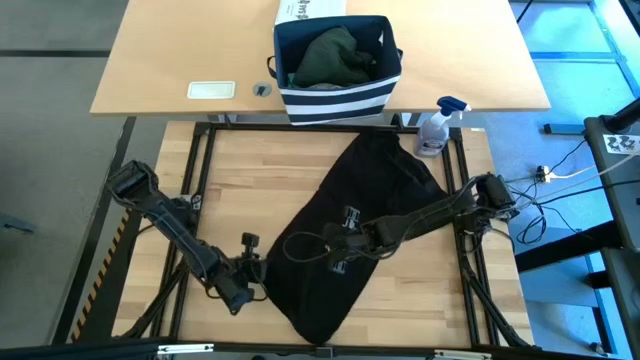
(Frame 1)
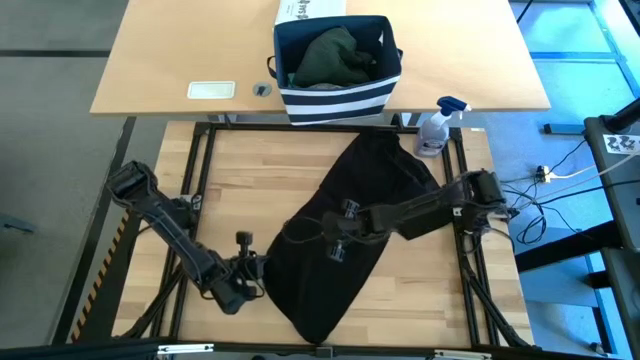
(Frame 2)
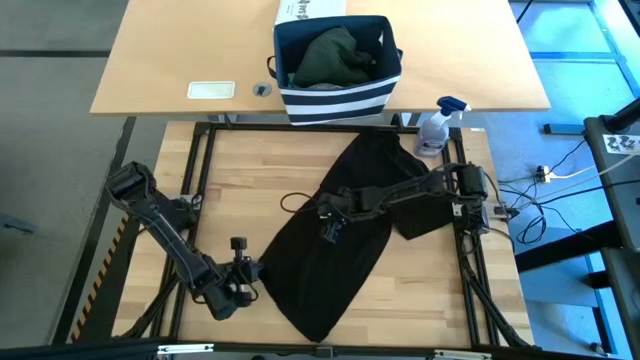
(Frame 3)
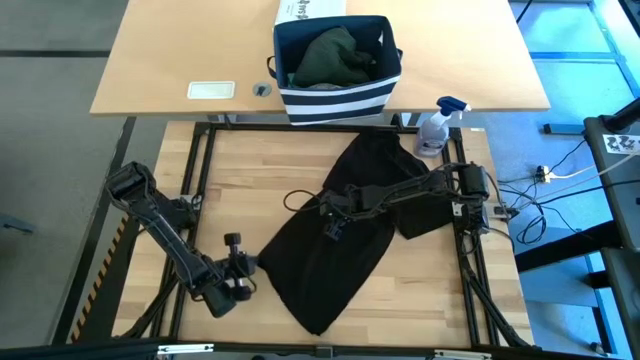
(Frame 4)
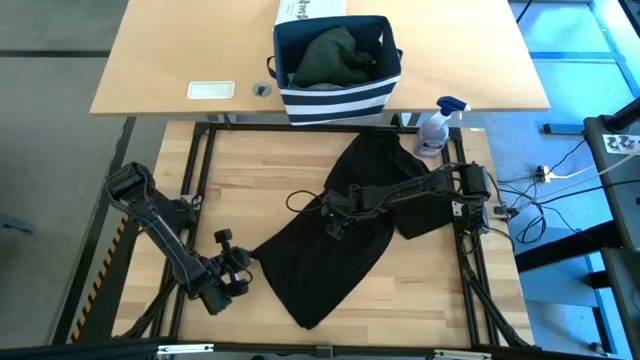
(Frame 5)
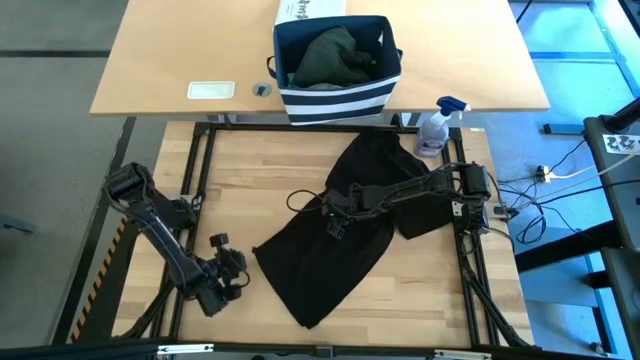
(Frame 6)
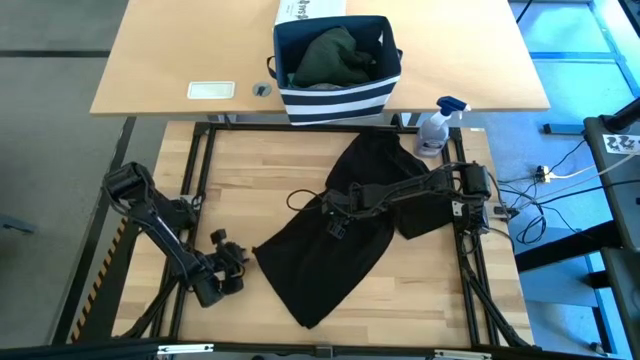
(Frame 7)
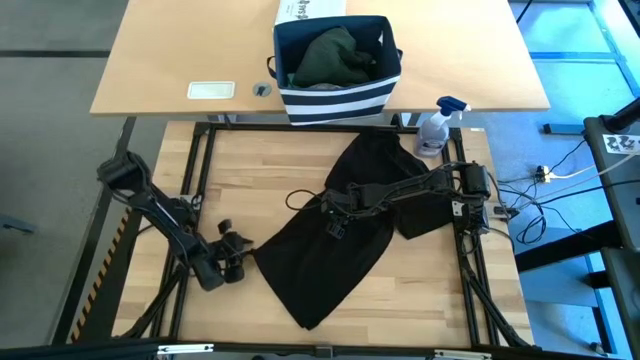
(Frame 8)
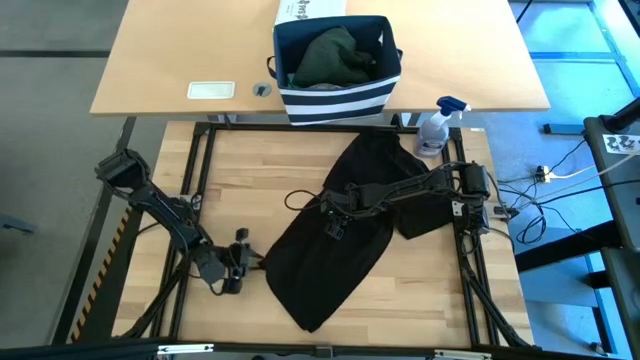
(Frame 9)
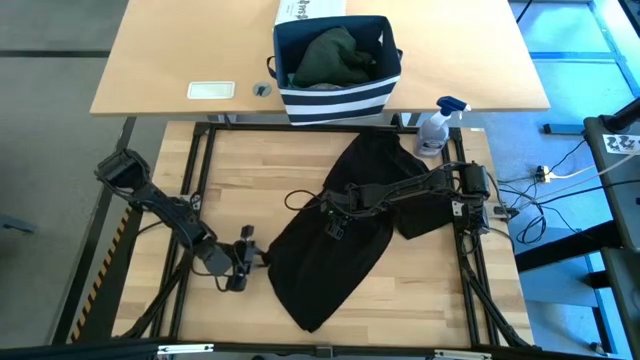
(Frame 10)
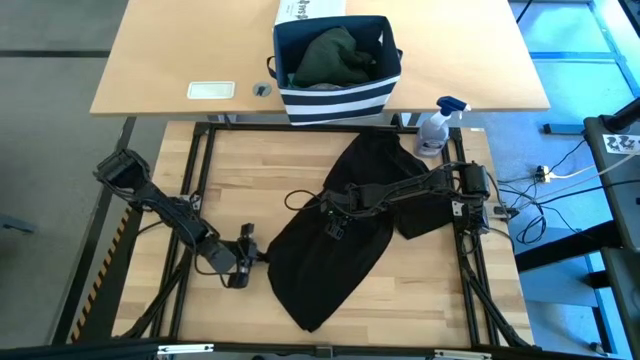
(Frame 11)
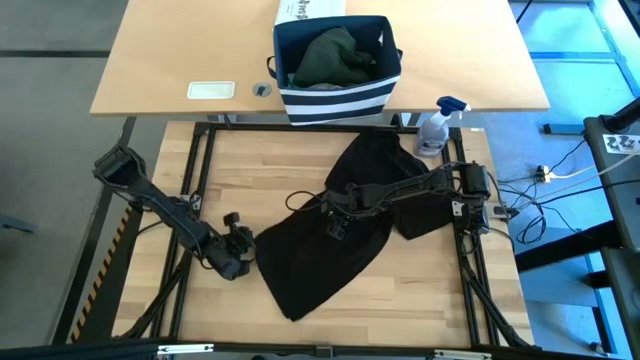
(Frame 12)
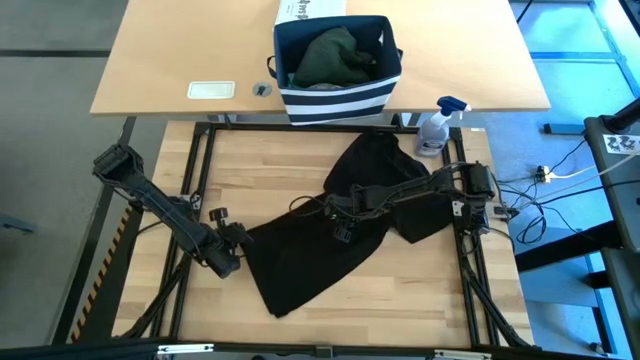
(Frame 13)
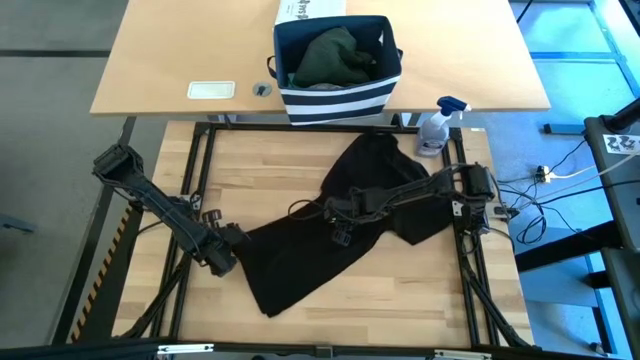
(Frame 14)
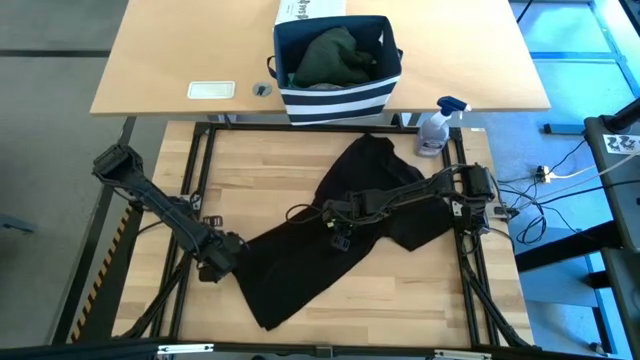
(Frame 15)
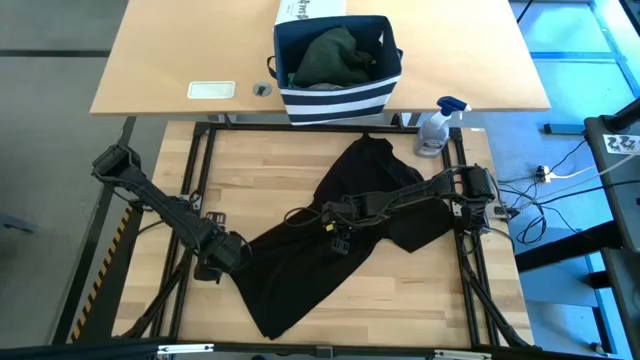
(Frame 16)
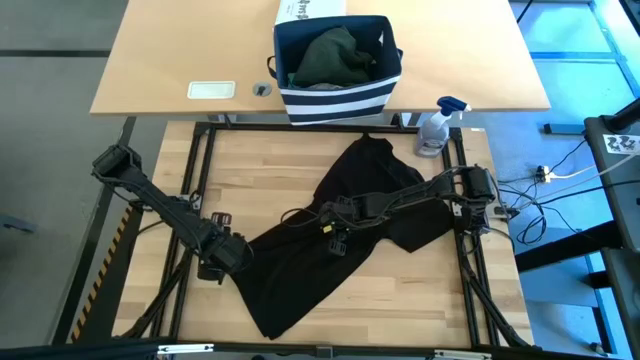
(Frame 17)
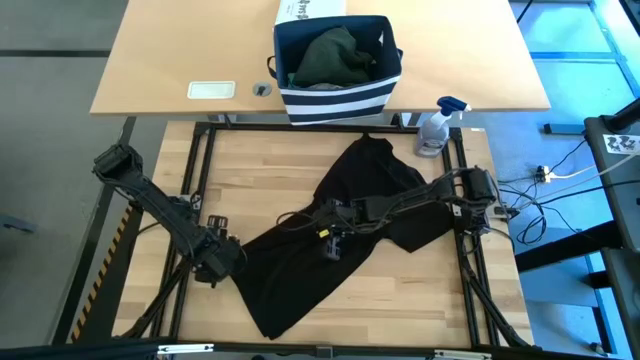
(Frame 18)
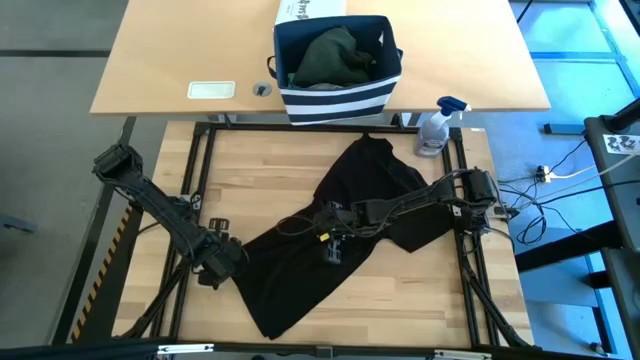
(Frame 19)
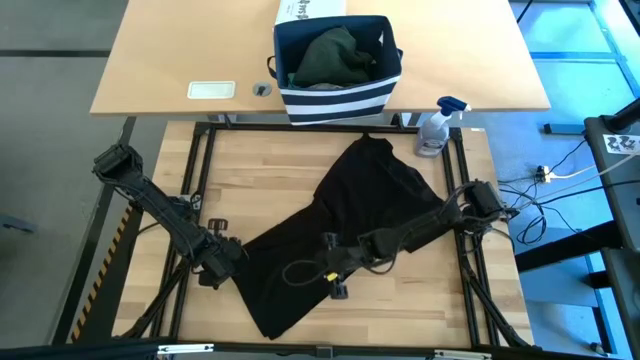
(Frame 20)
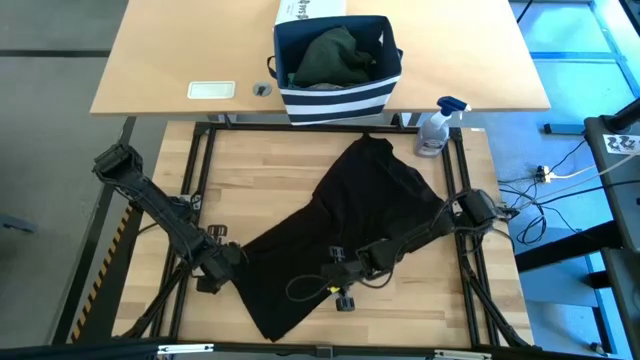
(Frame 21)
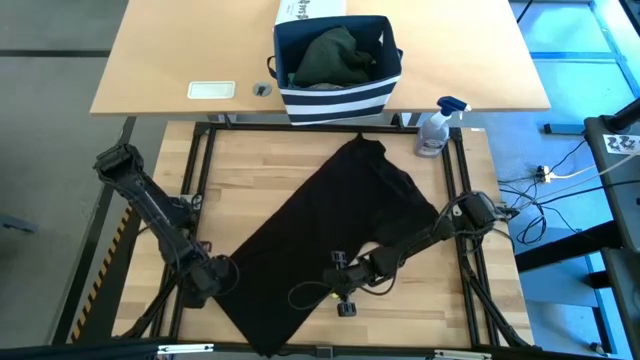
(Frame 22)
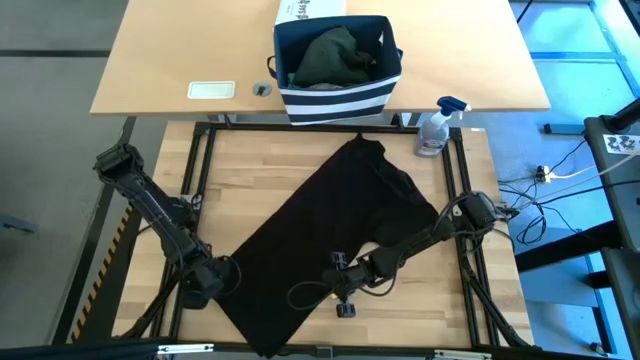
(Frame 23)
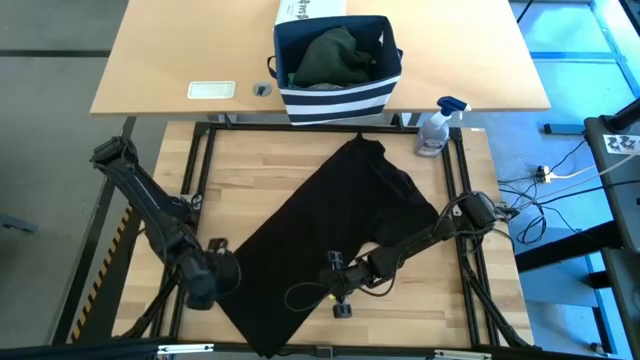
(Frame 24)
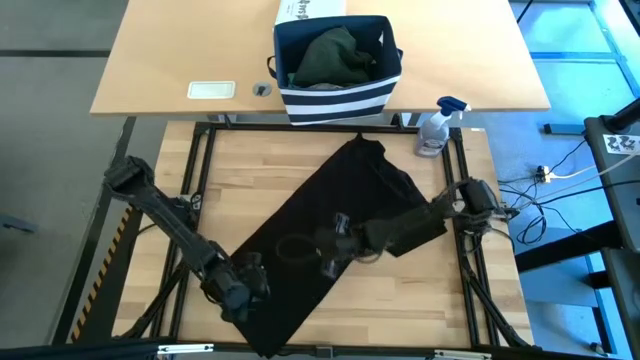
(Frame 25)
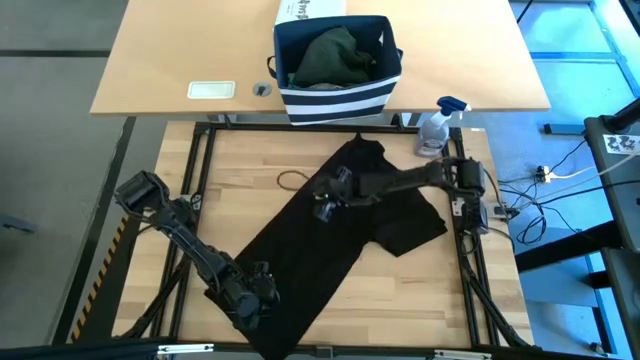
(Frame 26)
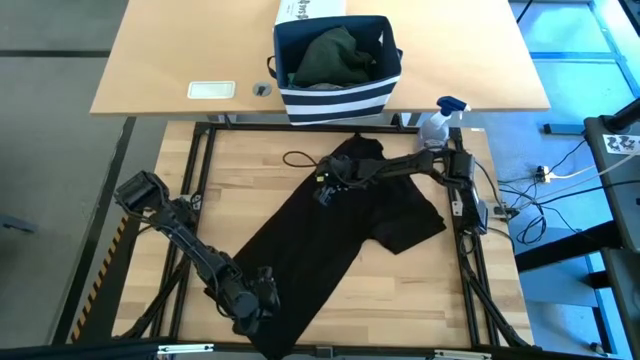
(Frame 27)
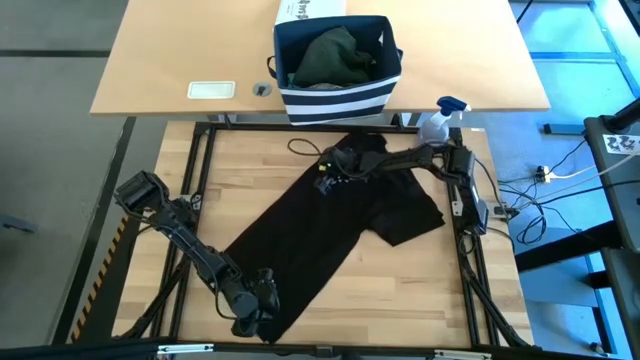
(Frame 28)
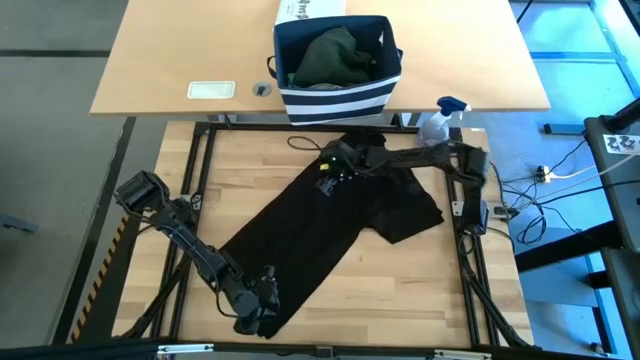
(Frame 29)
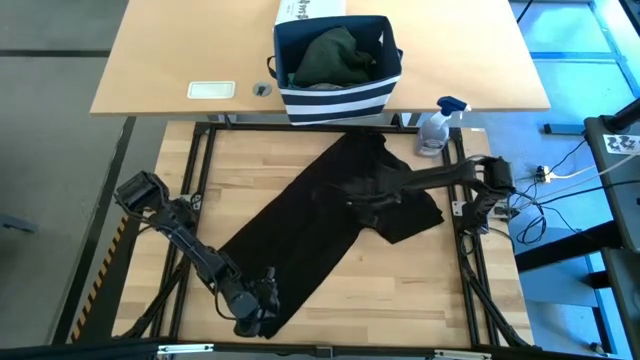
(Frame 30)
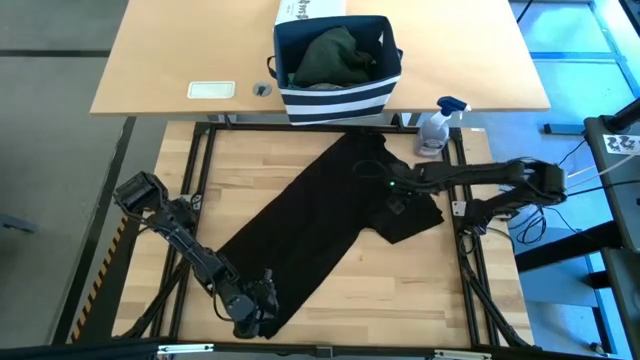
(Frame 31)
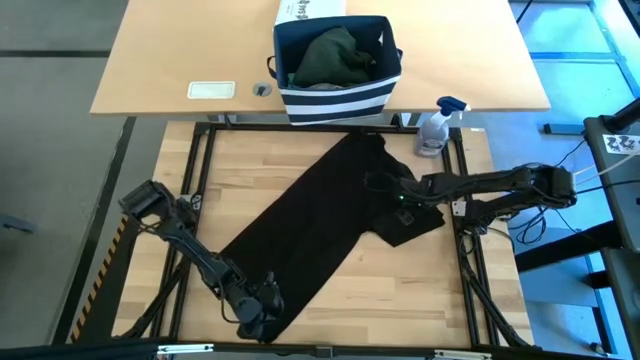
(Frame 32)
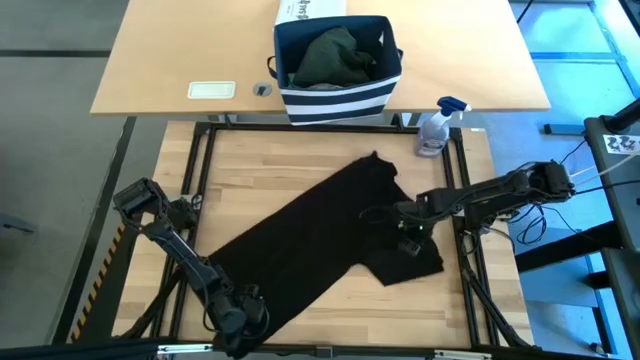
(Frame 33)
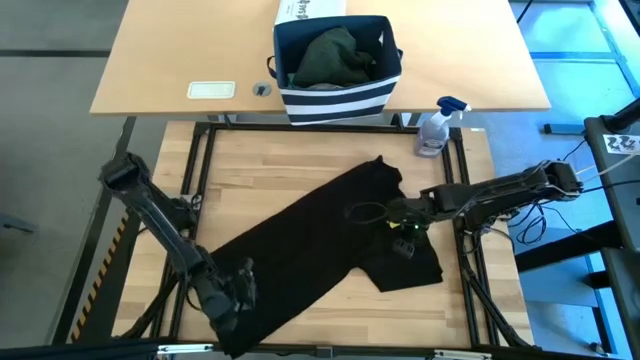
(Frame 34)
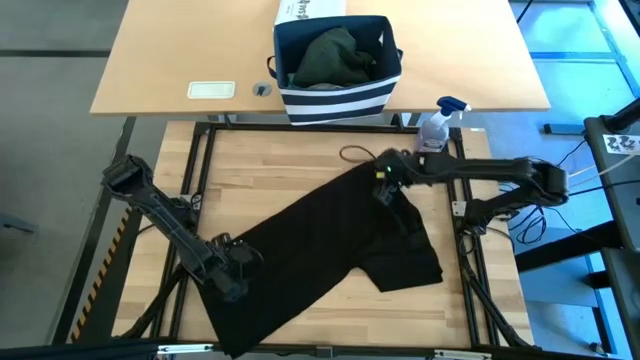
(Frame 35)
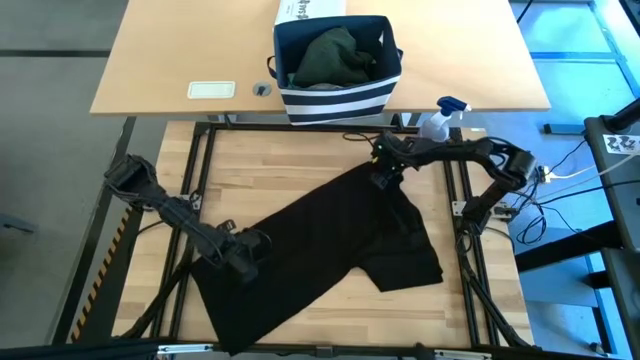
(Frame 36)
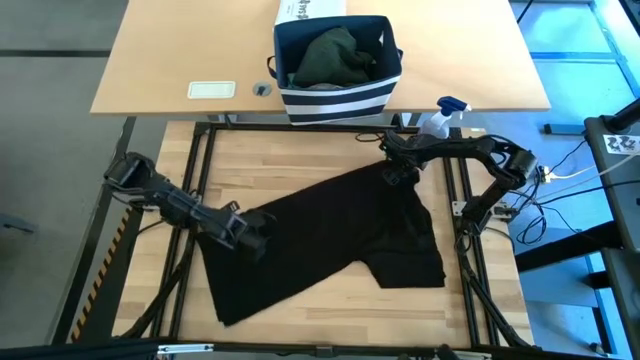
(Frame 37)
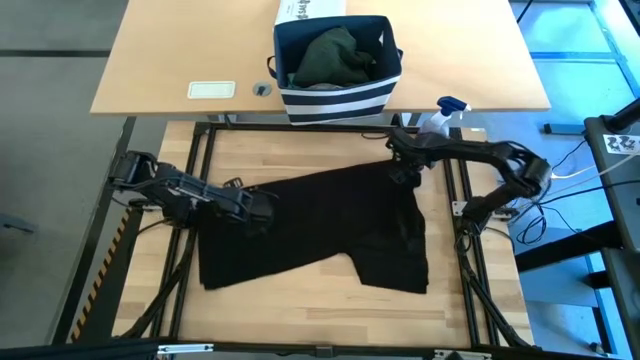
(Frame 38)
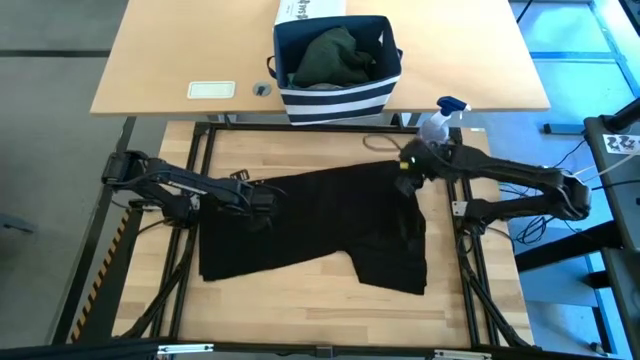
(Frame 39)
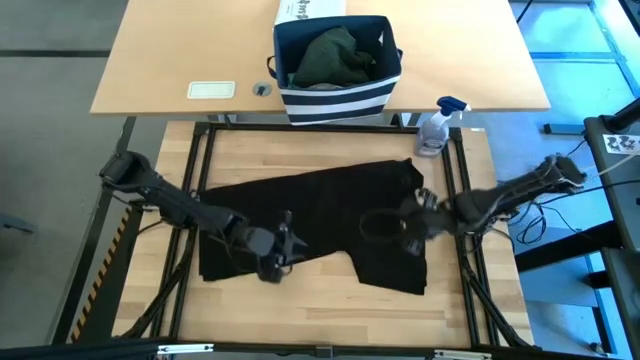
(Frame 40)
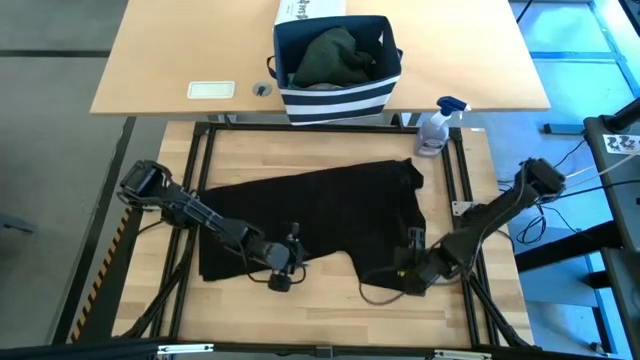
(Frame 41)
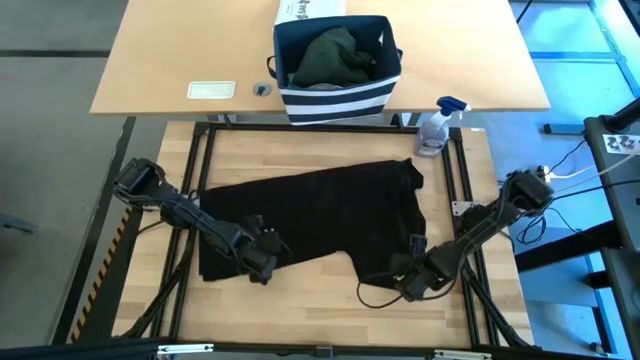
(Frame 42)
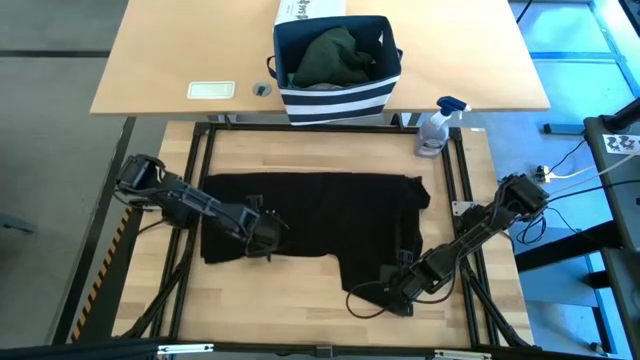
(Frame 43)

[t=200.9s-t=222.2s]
Task: Fold Laundry from Bin
Fold the black shirt
